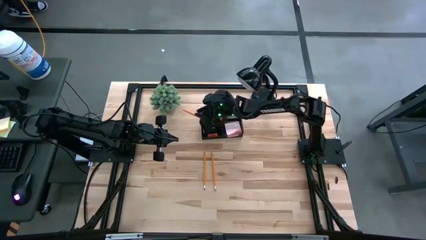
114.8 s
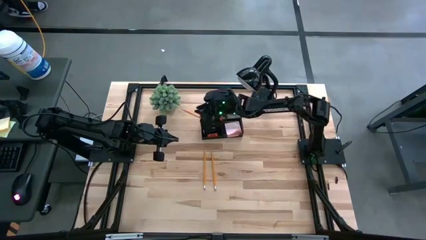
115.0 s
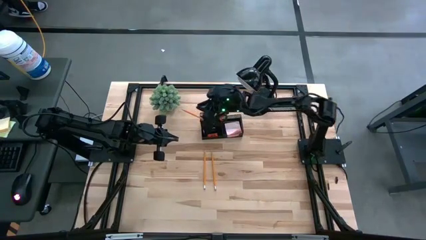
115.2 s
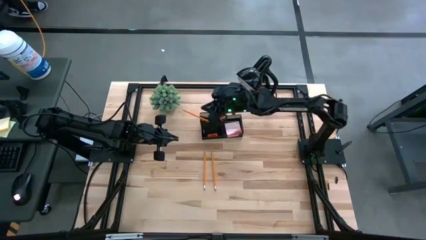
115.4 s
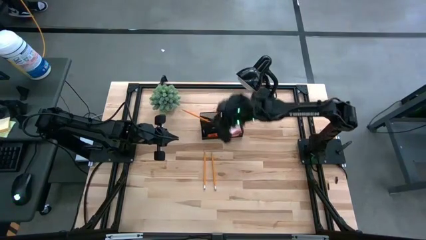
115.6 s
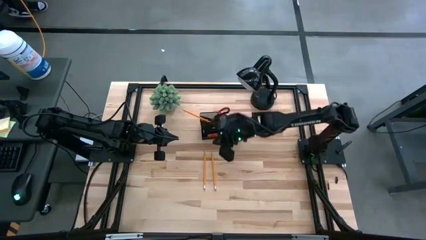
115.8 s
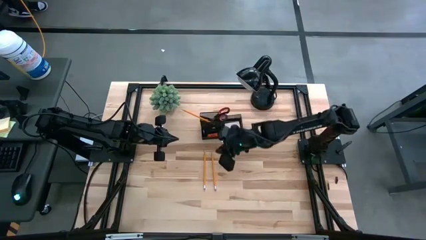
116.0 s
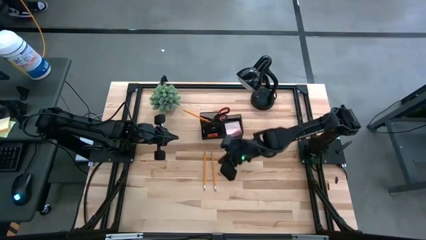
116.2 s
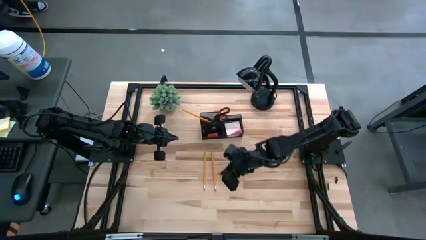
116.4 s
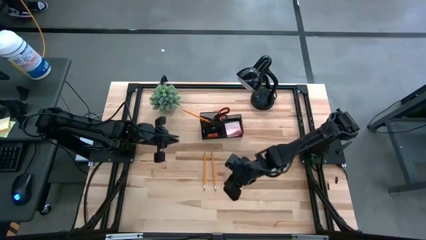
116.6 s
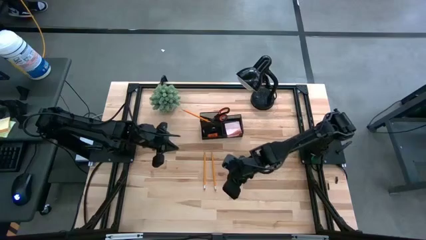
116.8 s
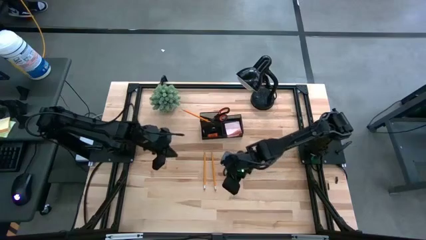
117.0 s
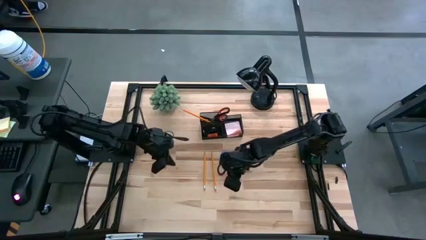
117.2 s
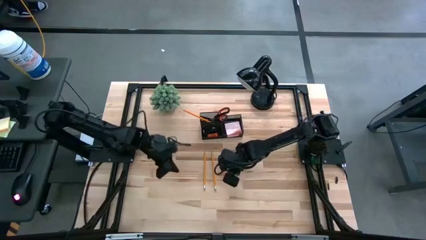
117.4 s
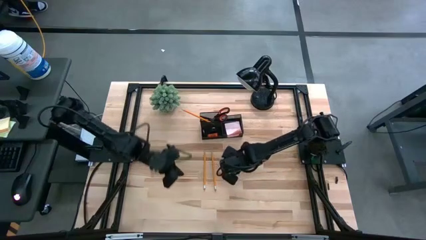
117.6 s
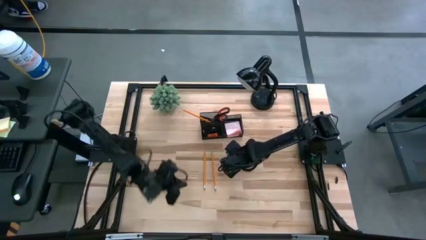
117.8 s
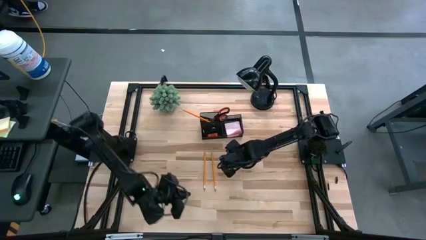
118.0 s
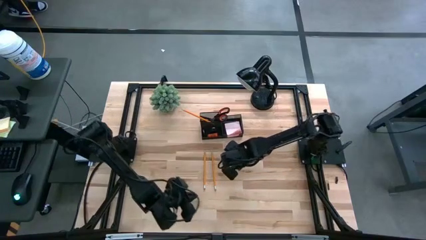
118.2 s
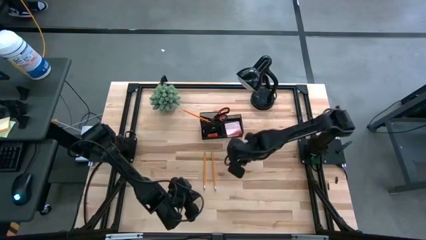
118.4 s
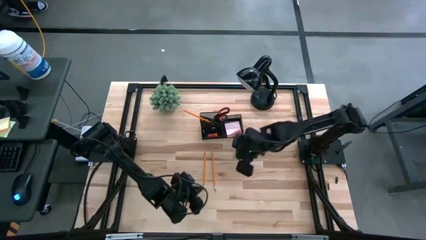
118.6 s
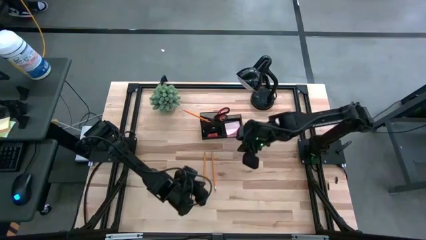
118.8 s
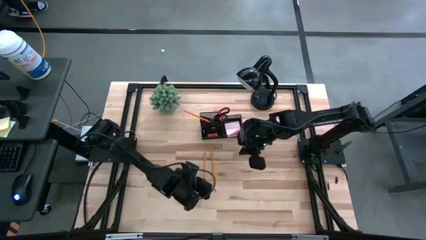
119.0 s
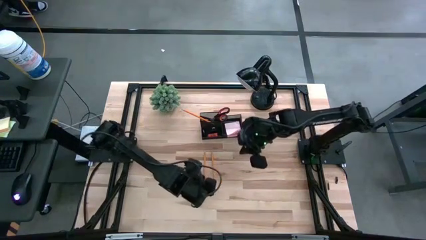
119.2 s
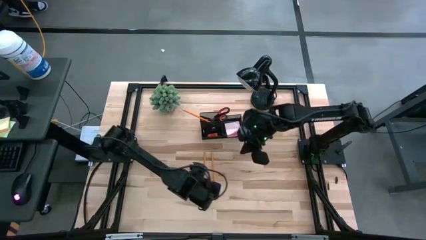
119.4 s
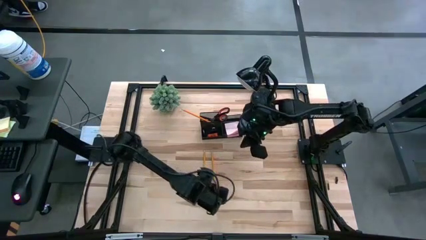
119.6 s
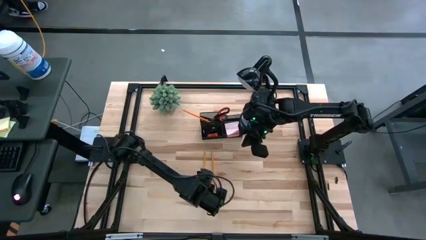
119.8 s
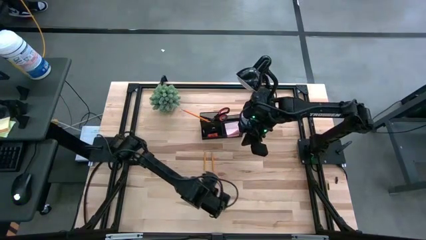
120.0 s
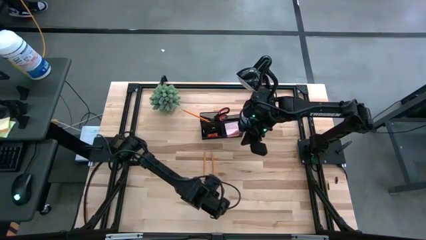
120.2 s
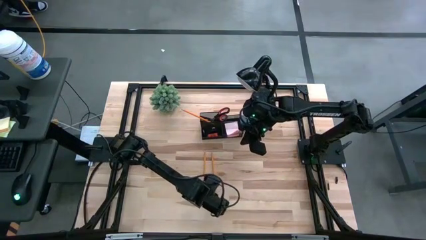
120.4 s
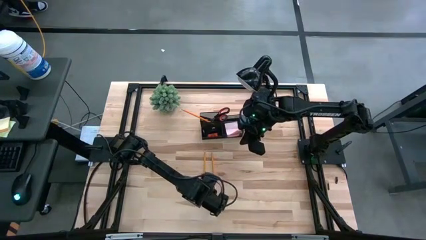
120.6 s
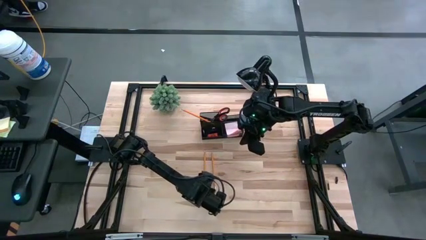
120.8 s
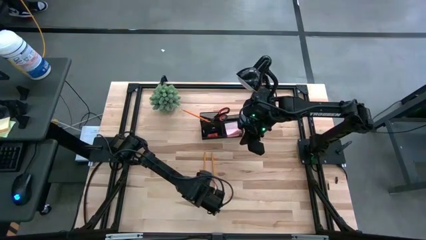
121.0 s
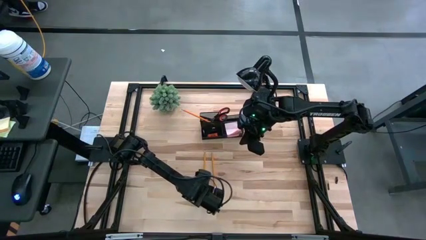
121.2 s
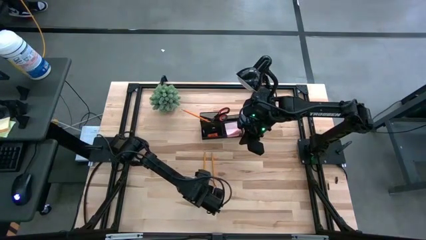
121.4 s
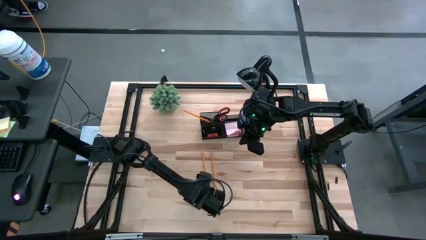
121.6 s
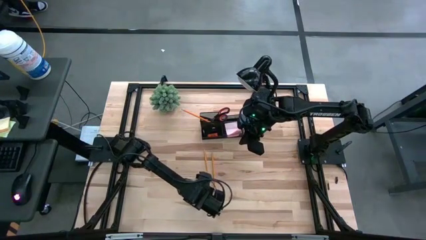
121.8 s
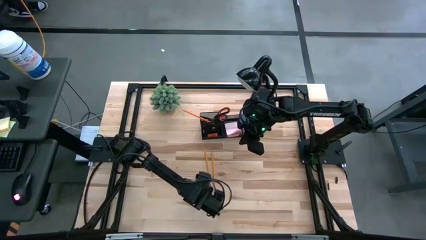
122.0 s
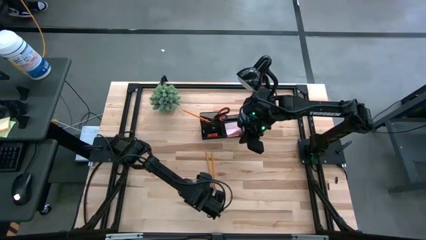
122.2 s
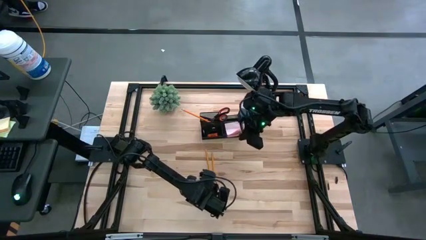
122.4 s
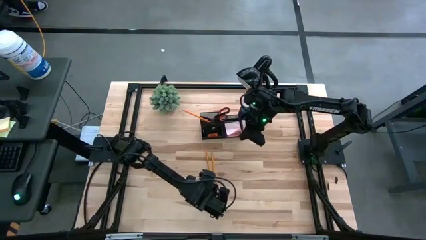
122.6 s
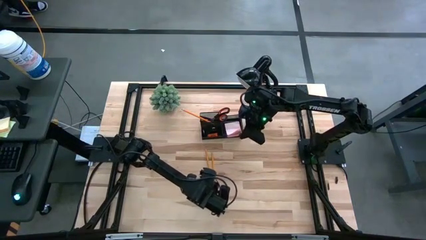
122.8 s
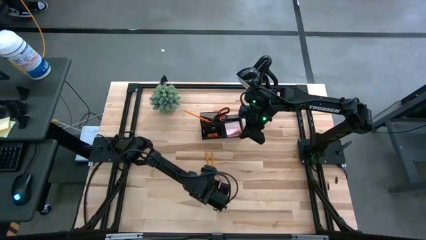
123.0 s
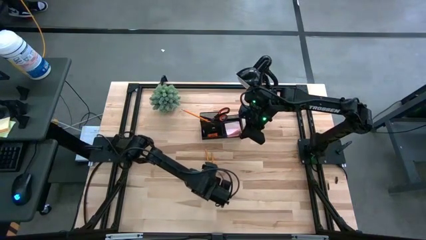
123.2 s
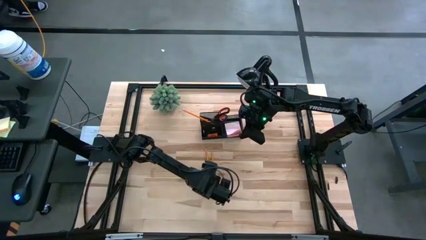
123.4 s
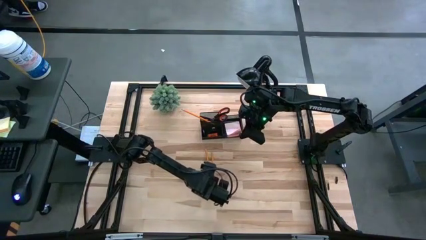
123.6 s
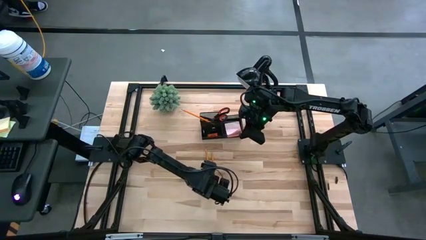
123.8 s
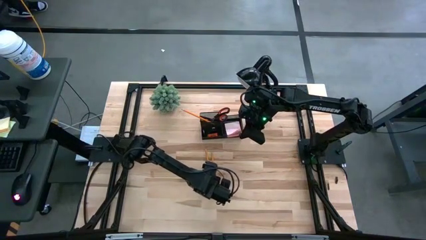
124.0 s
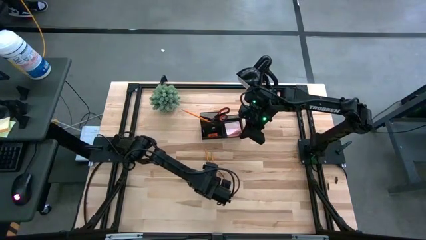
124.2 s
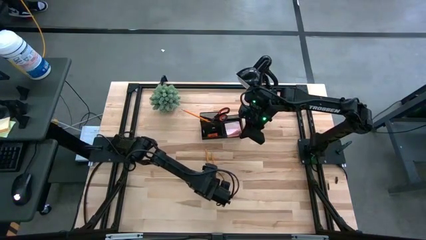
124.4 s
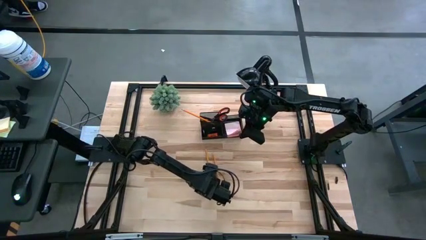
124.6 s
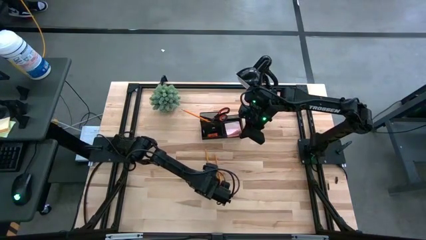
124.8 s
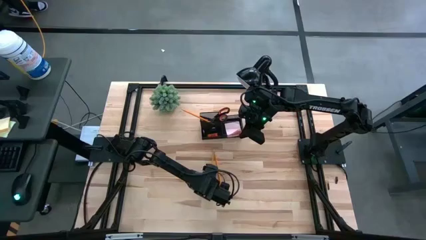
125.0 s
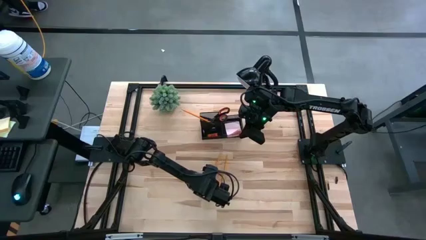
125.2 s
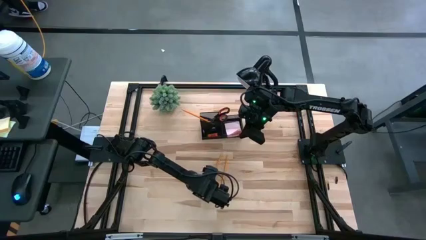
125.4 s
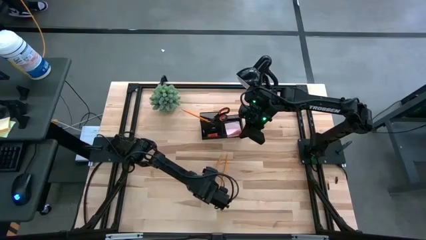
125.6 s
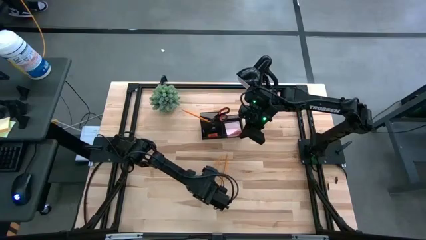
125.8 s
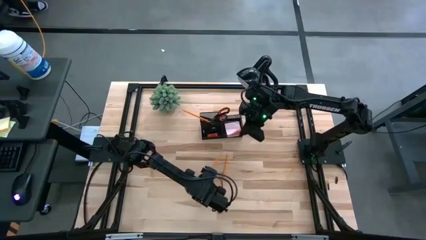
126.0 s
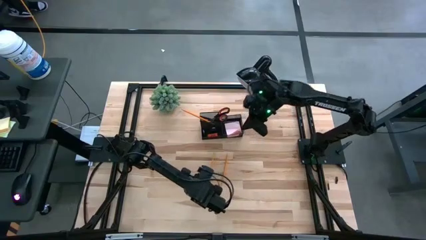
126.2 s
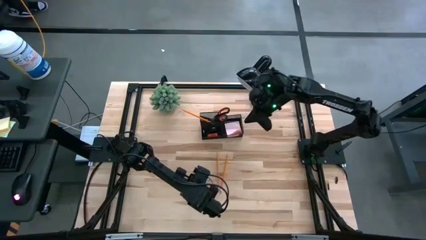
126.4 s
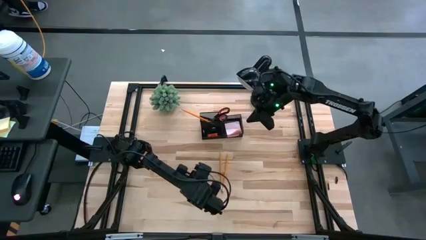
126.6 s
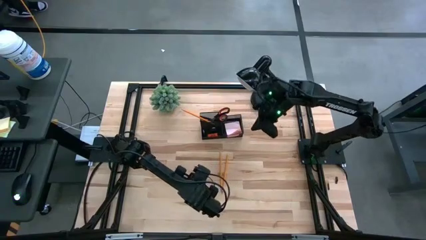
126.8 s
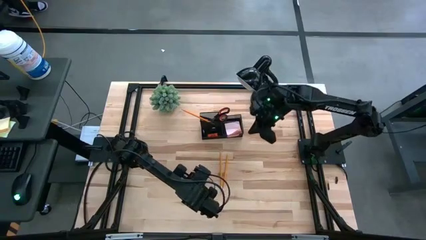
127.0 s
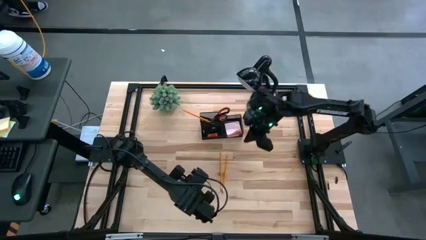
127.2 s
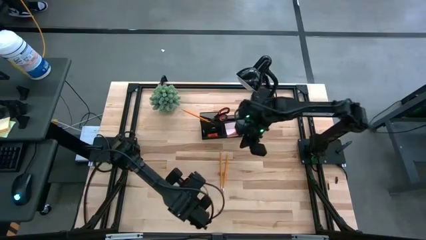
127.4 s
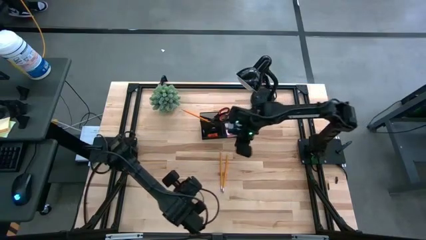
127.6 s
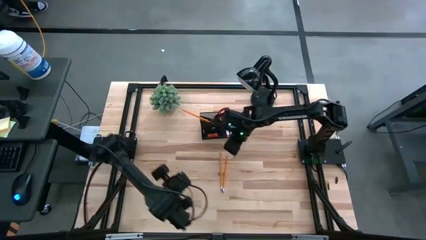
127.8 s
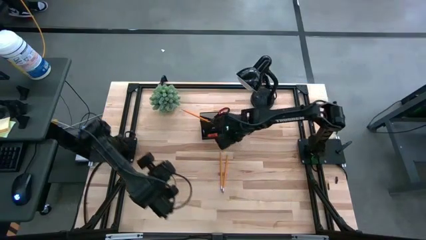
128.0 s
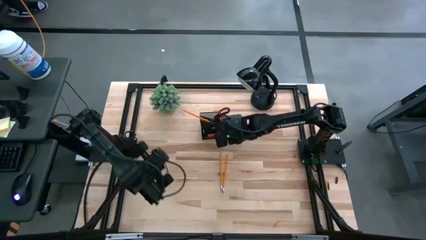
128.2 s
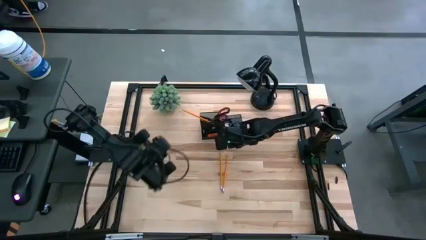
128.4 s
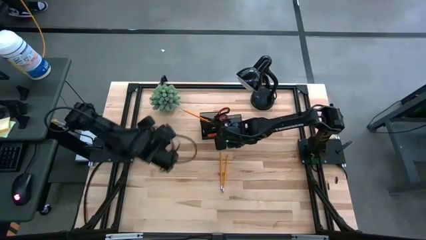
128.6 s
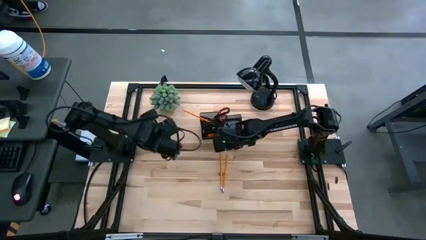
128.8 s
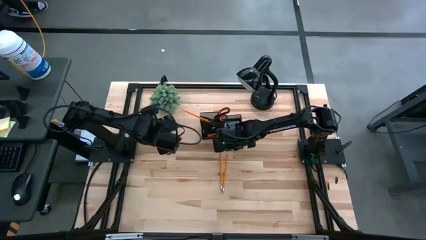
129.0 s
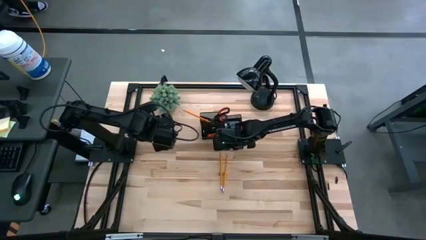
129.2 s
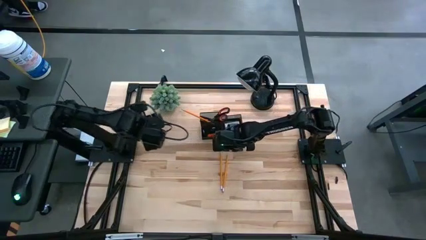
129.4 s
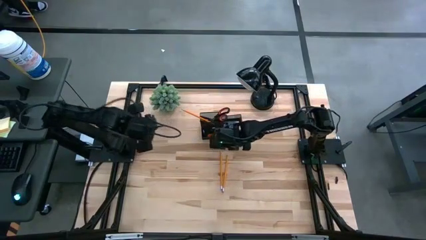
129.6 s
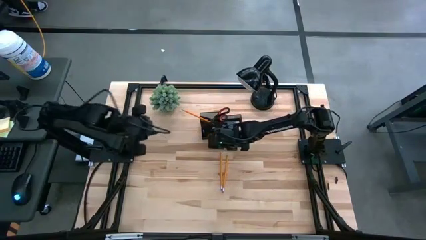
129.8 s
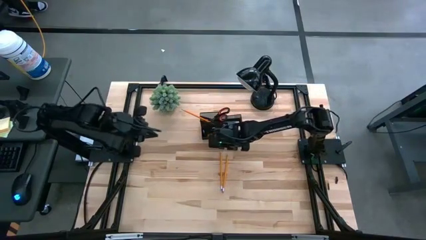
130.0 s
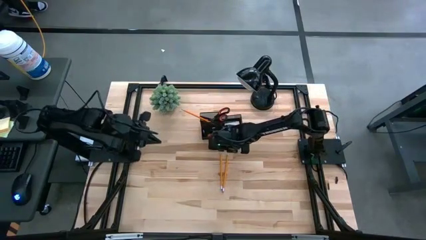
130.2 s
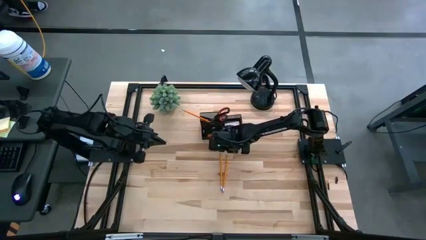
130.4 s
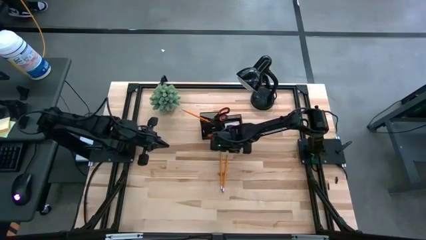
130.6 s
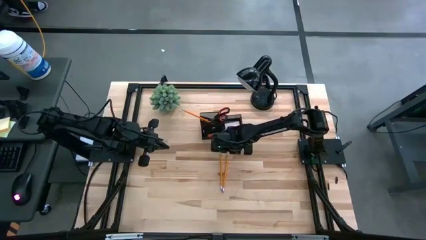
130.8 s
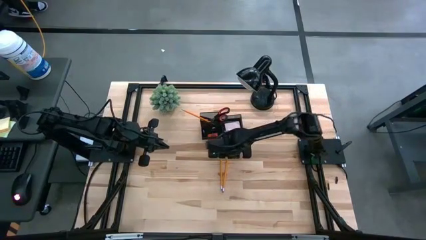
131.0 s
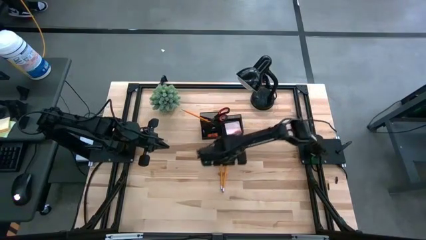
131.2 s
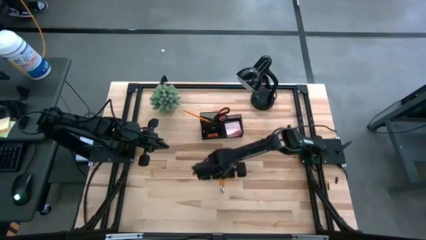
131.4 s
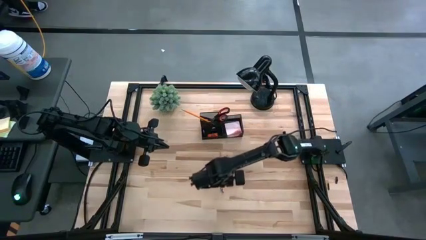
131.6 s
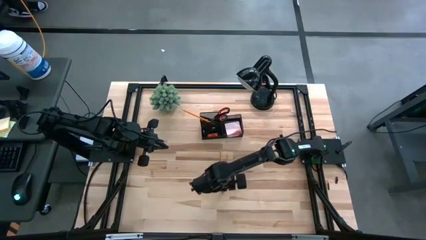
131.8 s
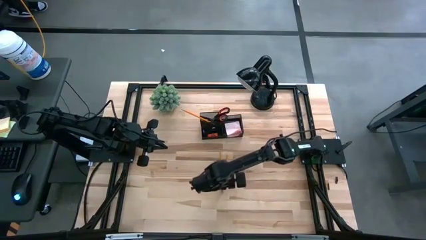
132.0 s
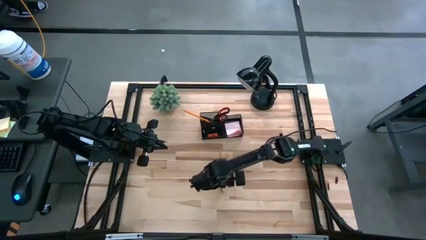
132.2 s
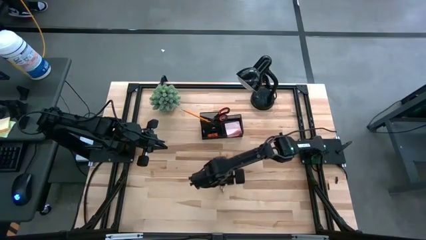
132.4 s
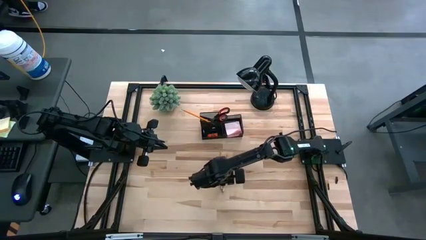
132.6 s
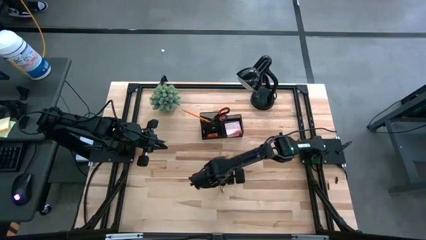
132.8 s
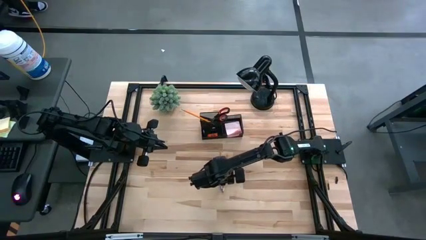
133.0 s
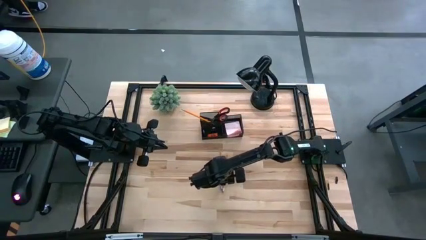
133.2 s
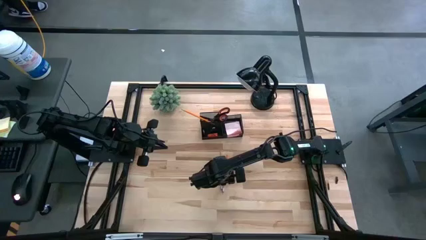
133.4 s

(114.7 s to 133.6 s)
Task: Pick and place office supplies into organizer
Put the left pencil into the desk organizer
